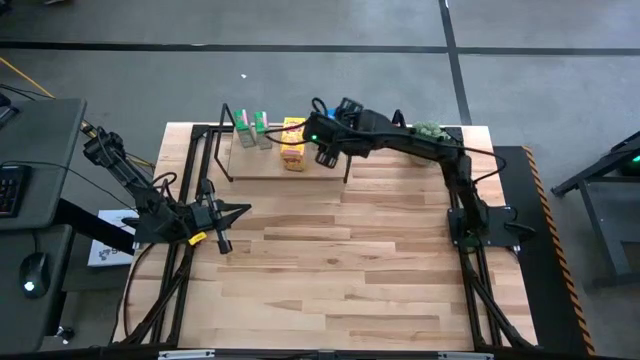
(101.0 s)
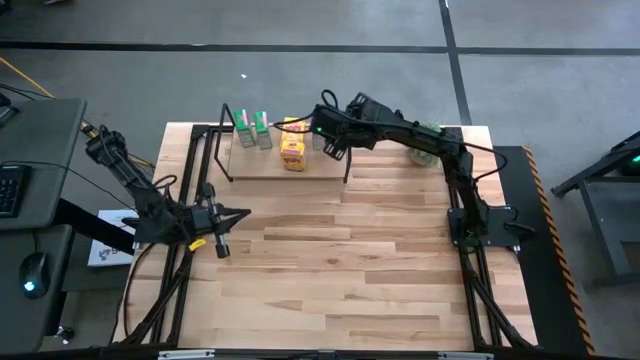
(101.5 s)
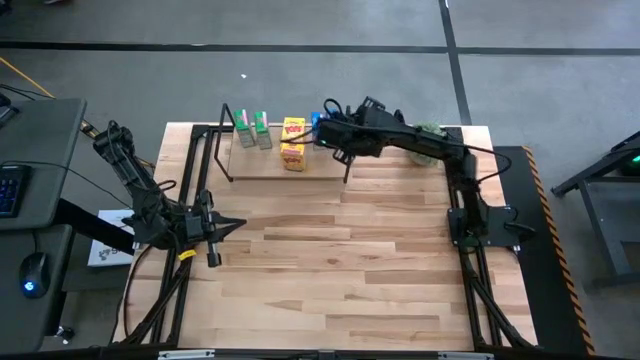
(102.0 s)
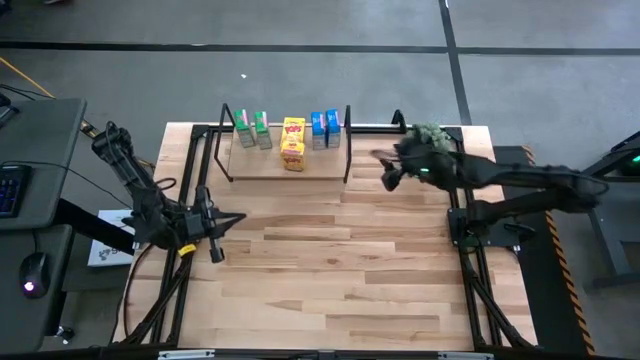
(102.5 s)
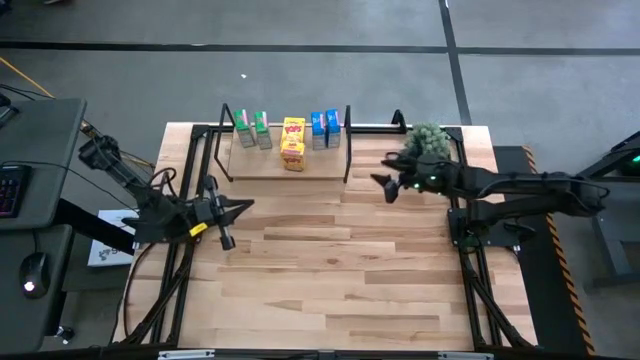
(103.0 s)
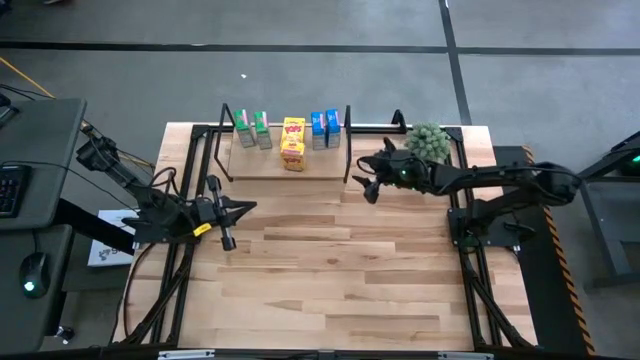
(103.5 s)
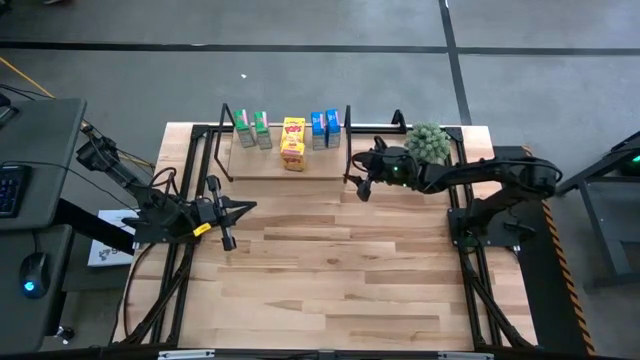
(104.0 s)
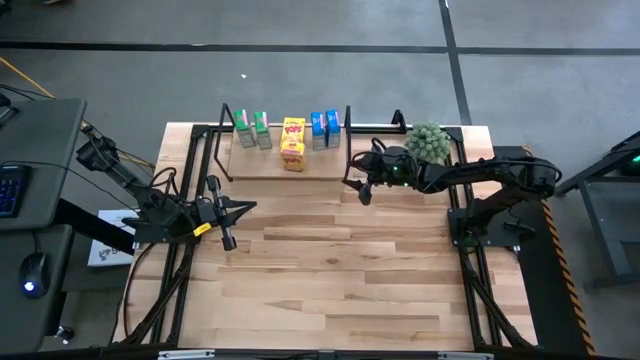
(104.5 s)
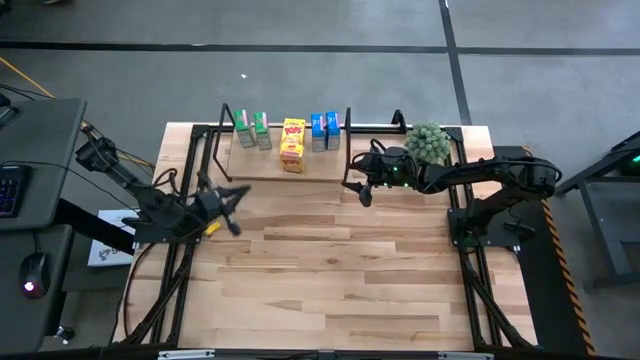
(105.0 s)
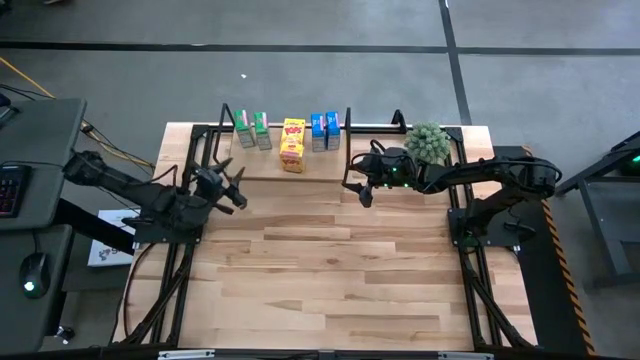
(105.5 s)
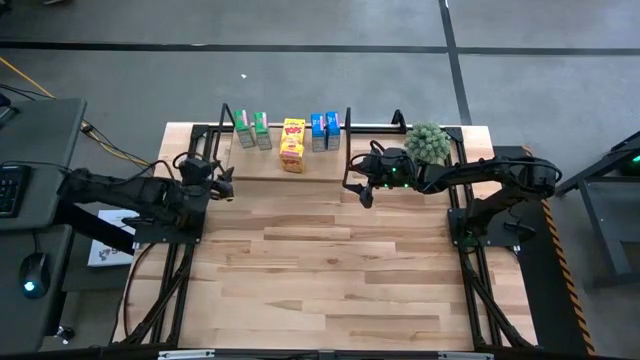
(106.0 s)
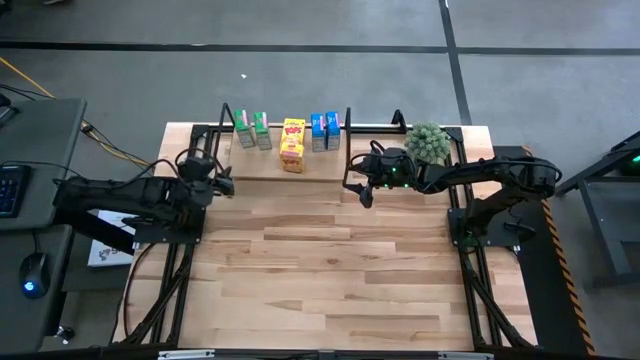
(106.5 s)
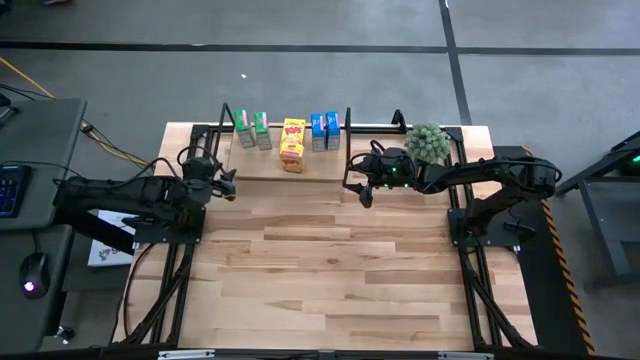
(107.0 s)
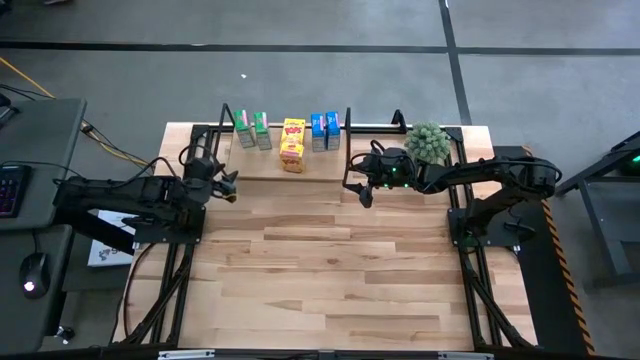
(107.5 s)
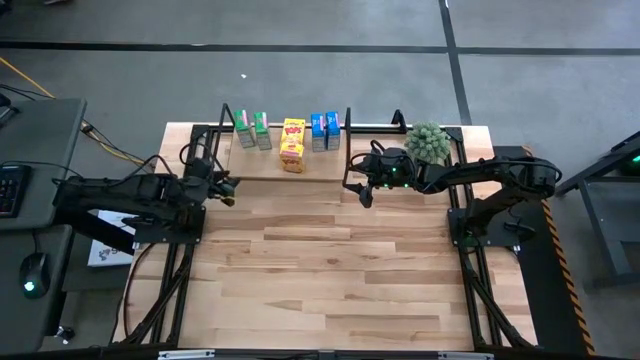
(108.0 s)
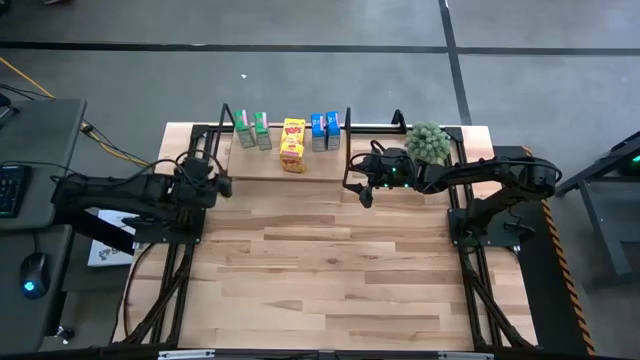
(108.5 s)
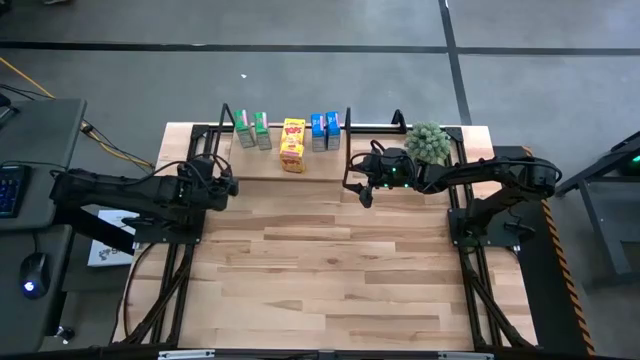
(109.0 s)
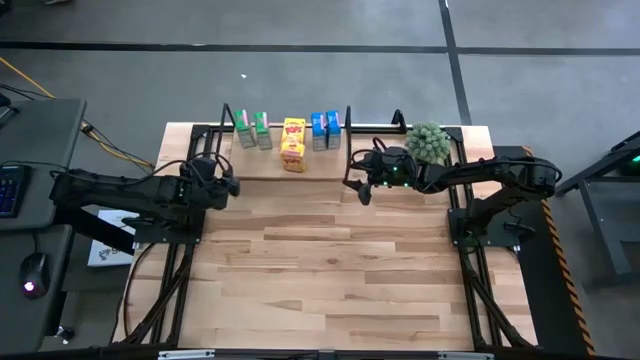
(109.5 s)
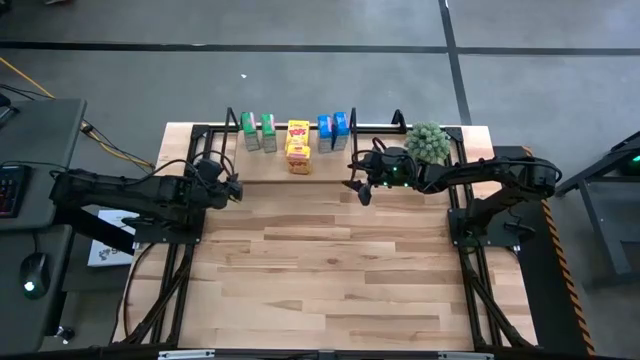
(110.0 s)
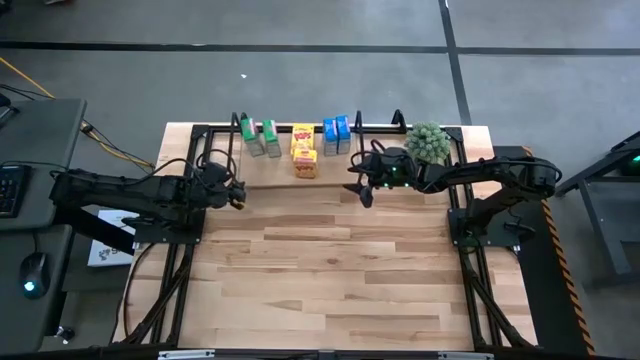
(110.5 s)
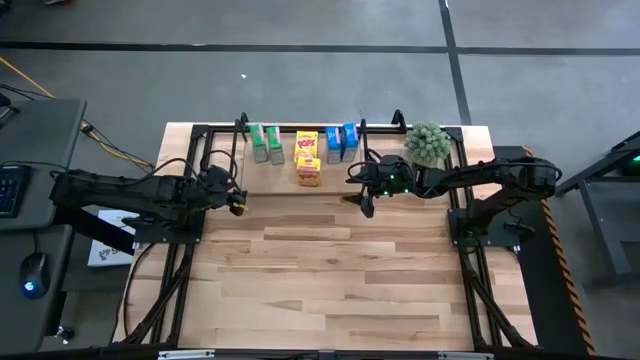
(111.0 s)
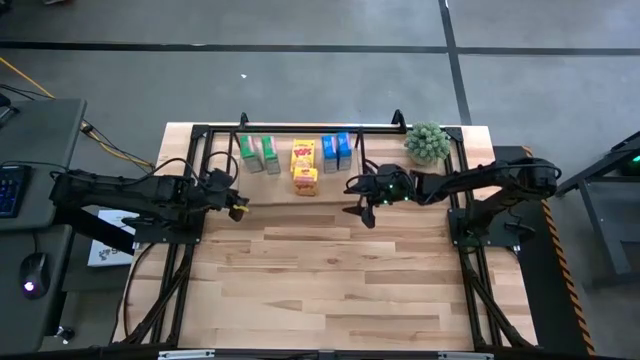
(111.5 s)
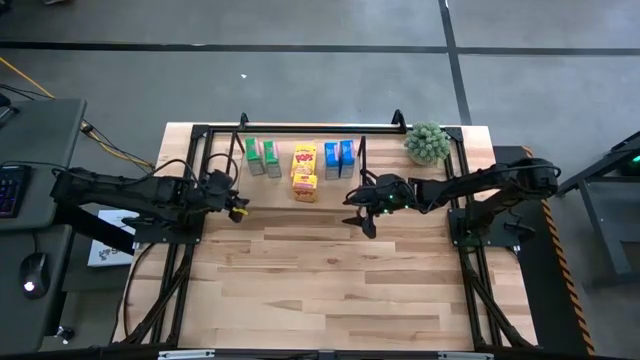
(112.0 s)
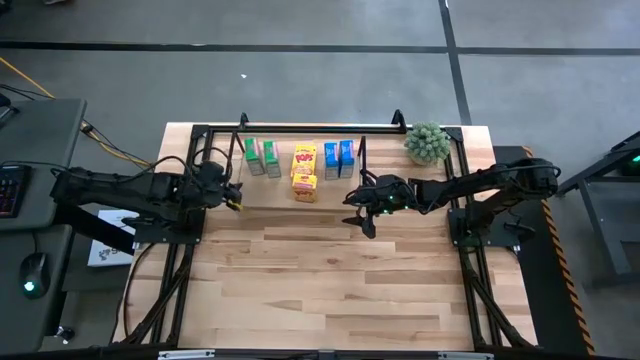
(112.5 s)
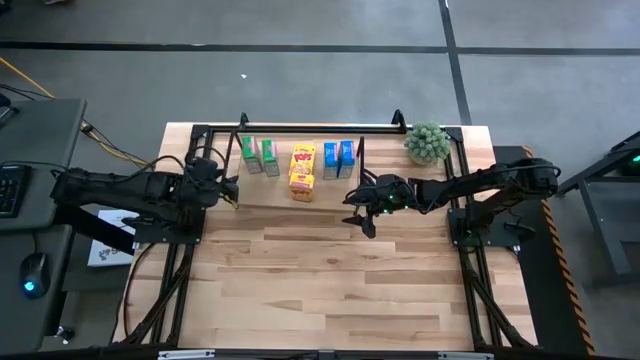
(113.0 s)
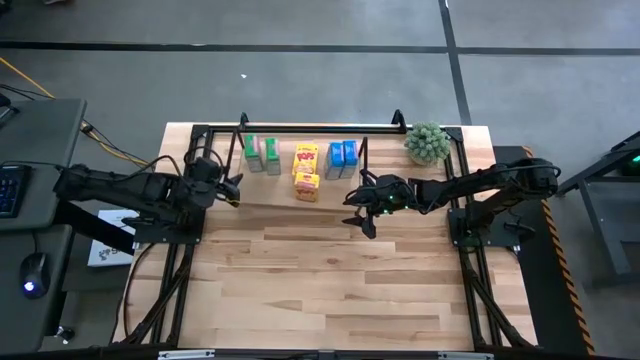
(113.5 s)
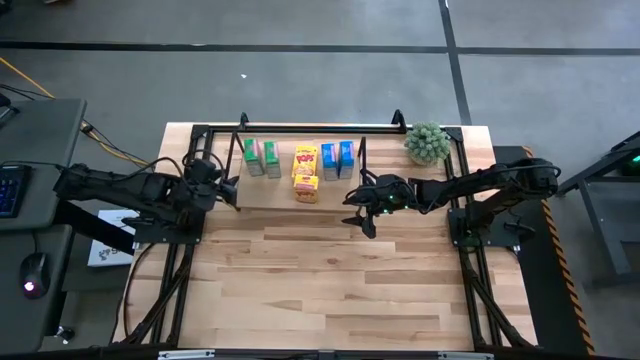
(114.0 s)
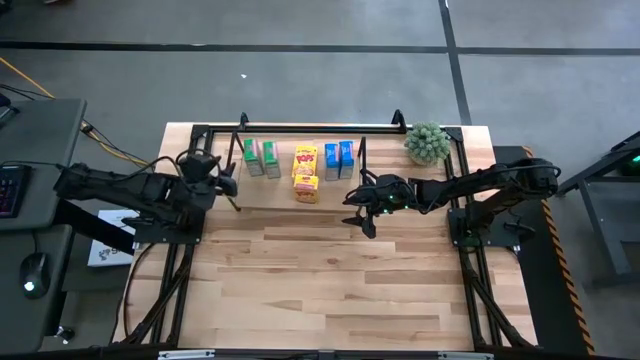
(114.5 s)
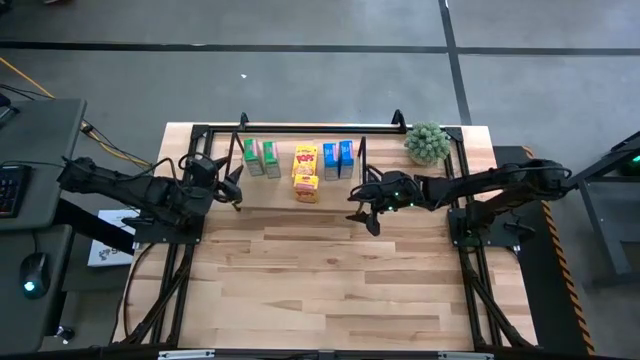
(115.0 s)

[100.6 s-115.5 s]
Task: Stack cereal on shelf
Adjust the shelf on the table

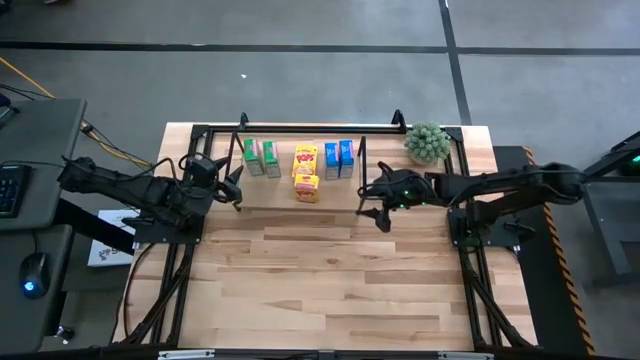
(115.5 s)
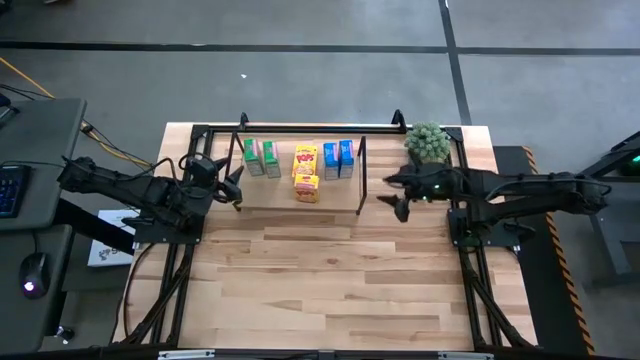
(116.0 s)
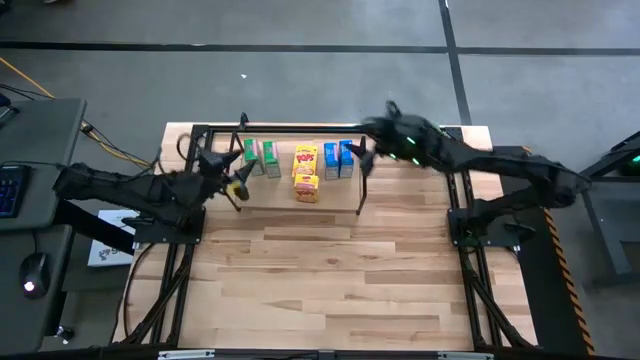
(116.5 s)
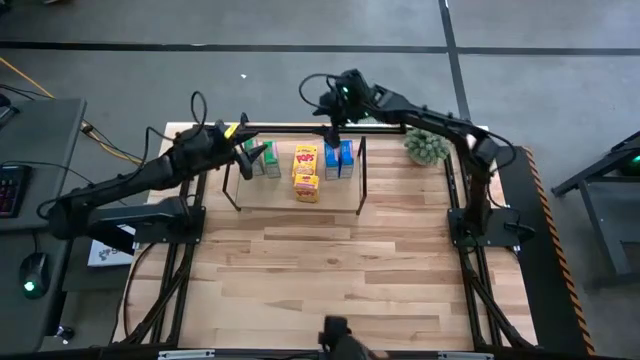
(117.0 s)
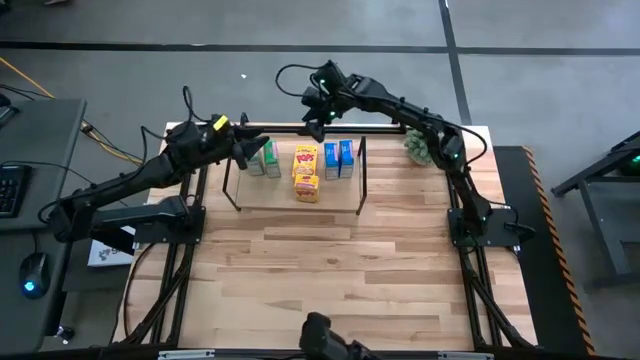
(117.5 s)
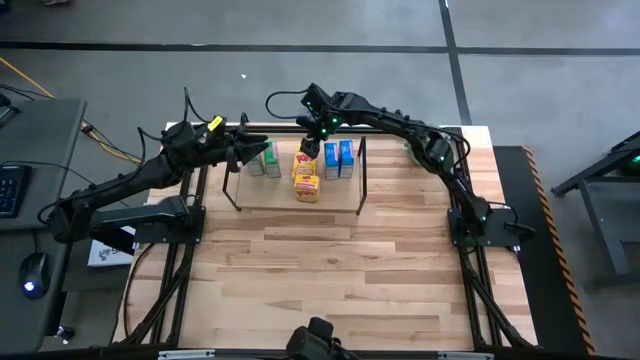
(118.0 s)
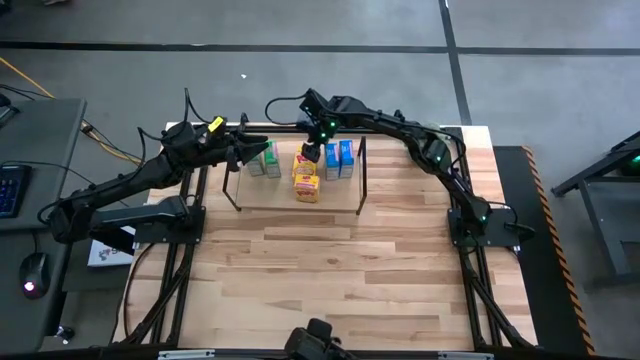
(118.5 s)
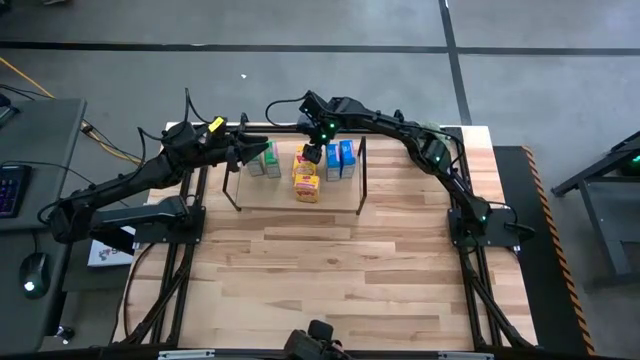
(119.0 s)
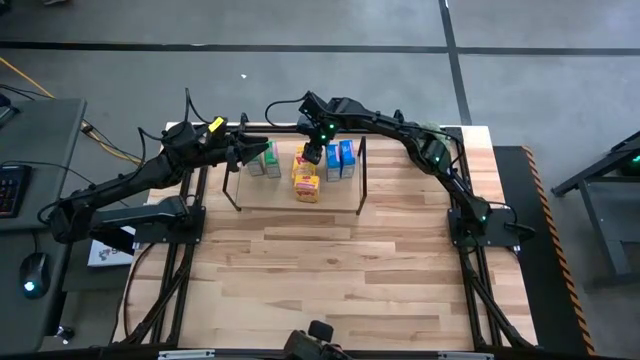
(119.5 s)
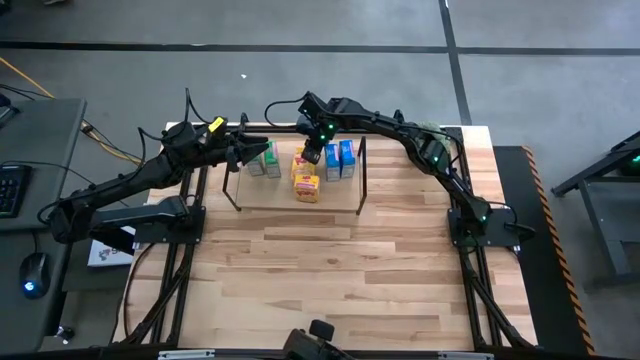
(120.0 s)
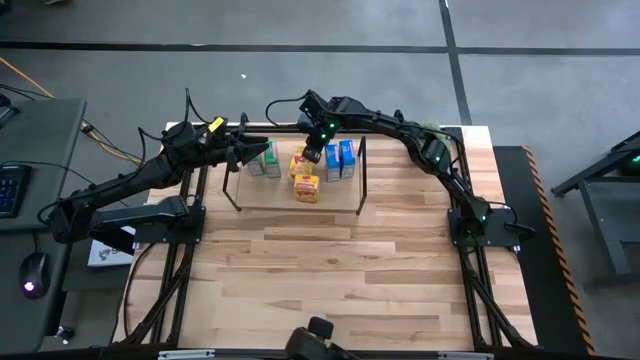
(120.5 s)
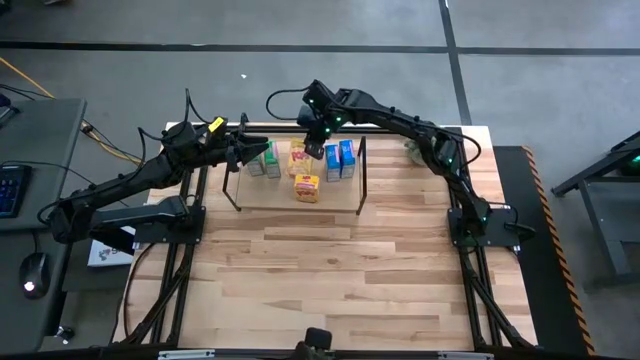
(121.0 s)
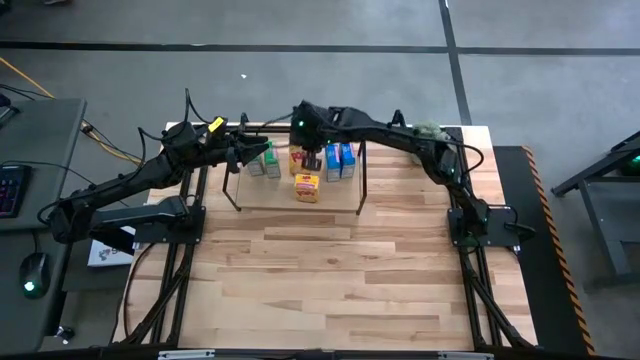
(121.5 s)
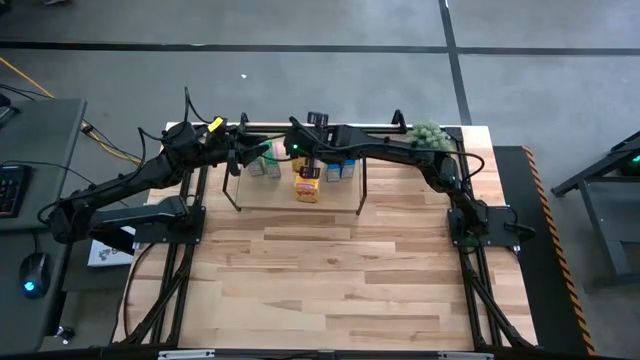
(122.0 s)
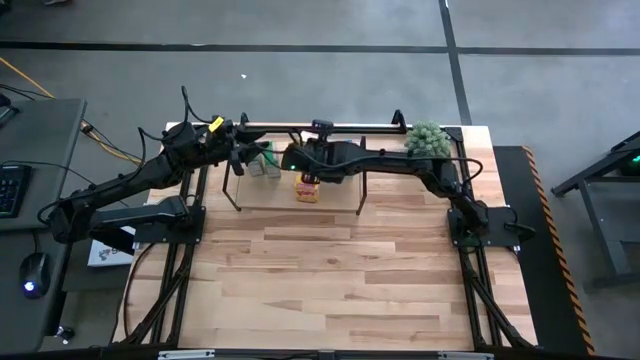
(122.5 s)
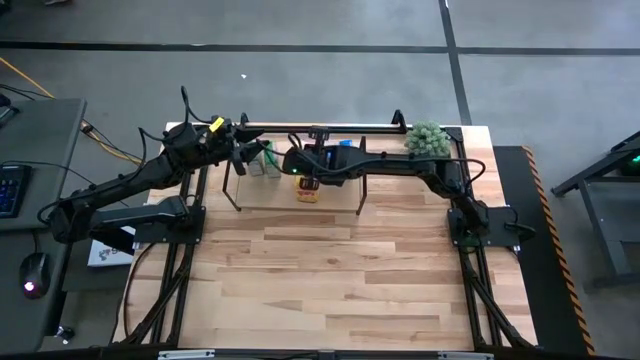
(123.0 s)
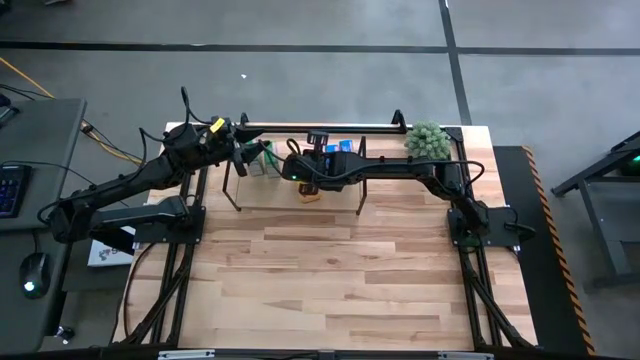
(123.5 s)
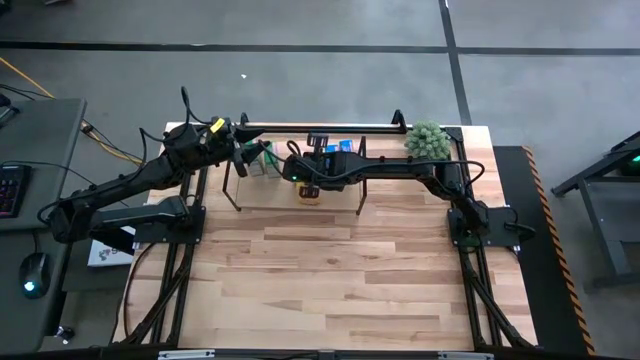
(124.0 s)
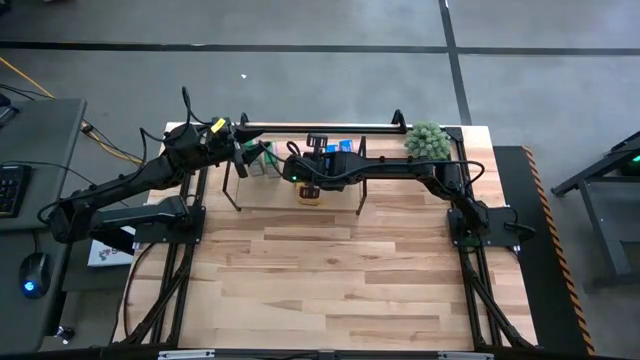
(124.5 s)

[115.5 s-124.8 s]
Adjust the yellow cereal box on the shelf
